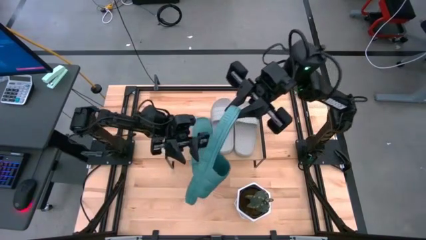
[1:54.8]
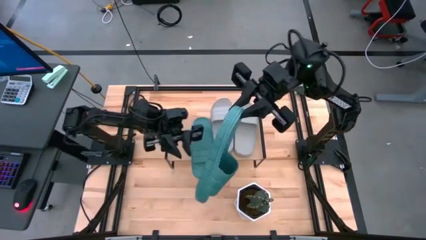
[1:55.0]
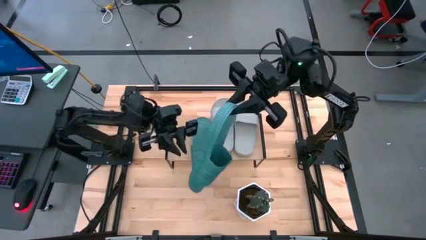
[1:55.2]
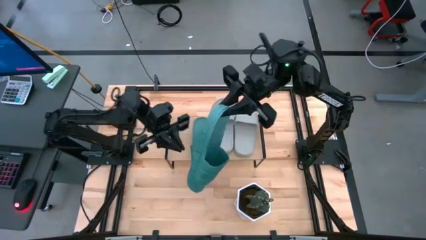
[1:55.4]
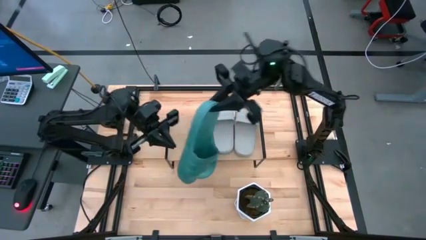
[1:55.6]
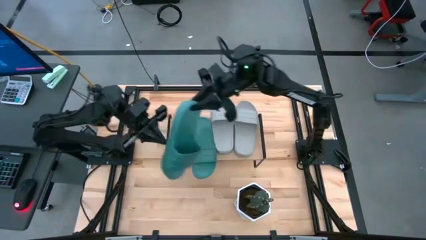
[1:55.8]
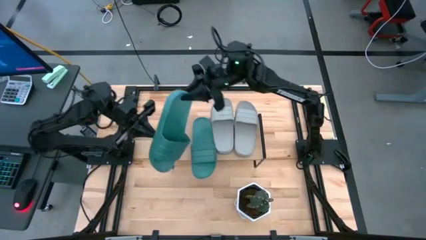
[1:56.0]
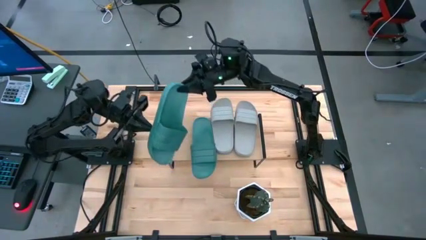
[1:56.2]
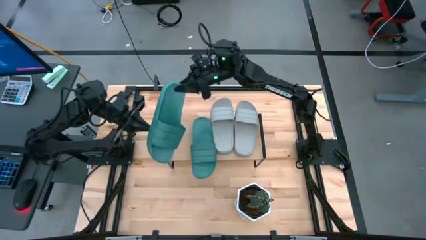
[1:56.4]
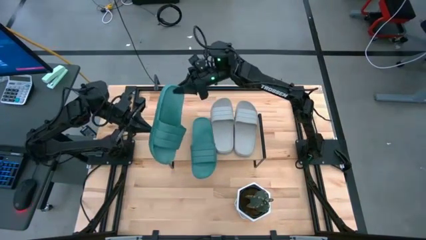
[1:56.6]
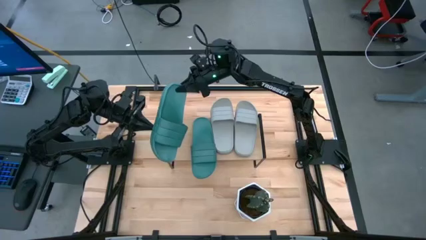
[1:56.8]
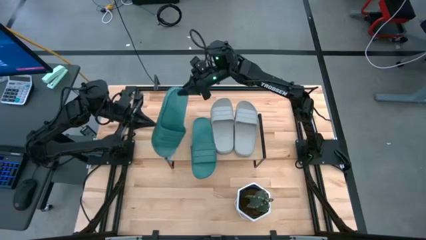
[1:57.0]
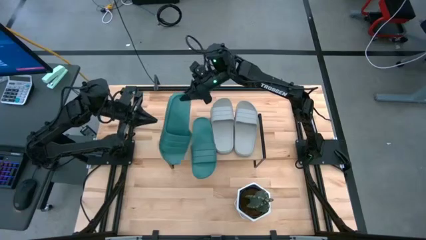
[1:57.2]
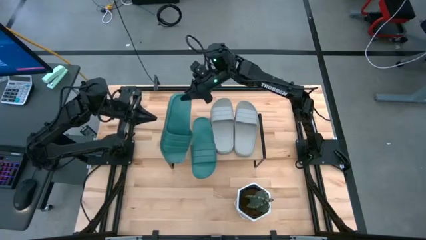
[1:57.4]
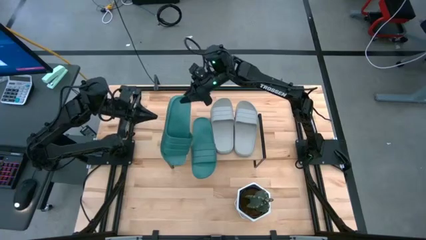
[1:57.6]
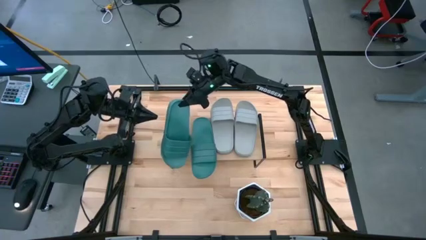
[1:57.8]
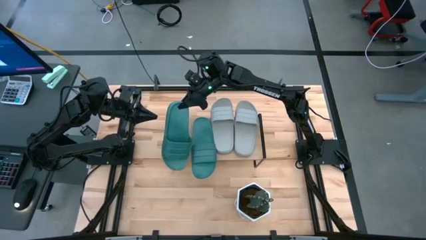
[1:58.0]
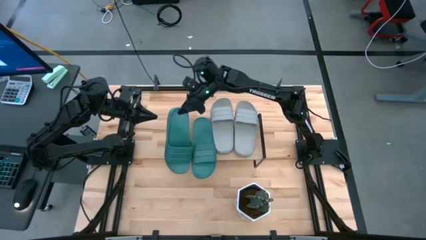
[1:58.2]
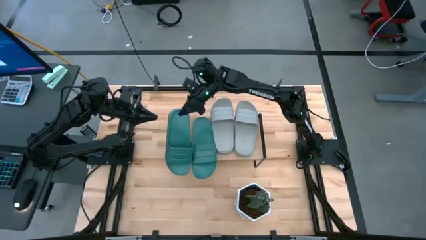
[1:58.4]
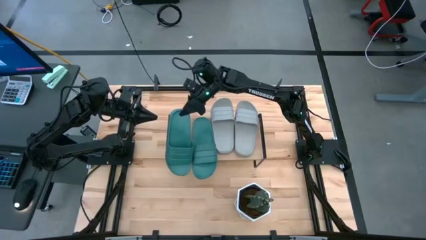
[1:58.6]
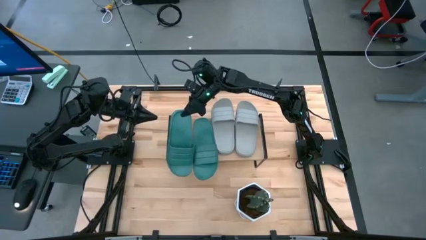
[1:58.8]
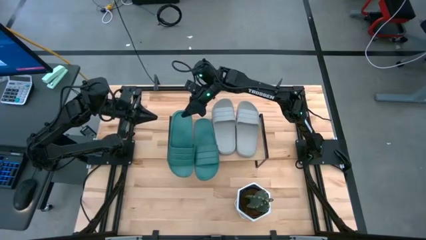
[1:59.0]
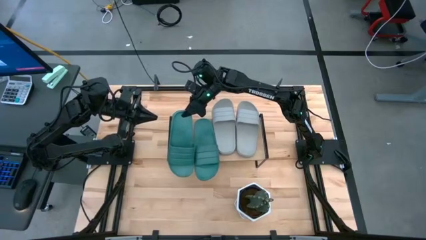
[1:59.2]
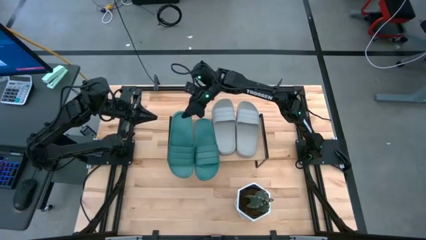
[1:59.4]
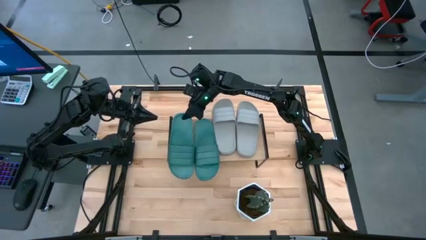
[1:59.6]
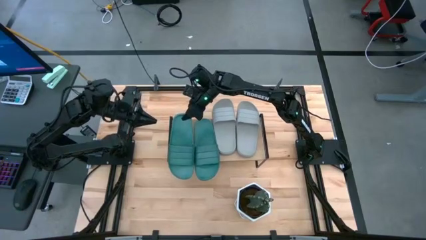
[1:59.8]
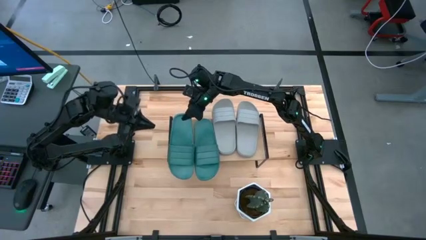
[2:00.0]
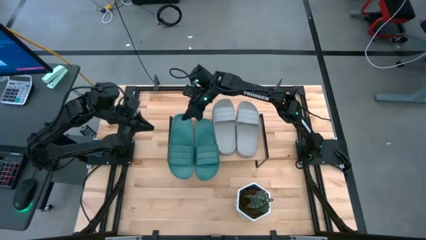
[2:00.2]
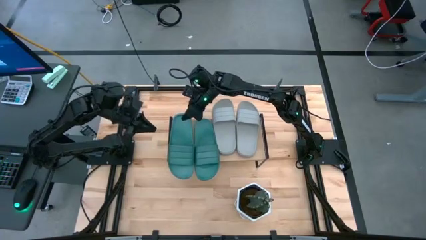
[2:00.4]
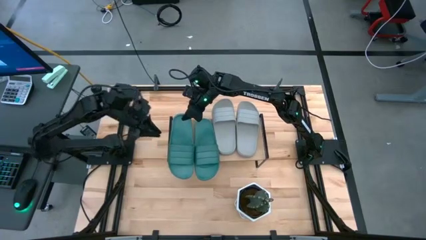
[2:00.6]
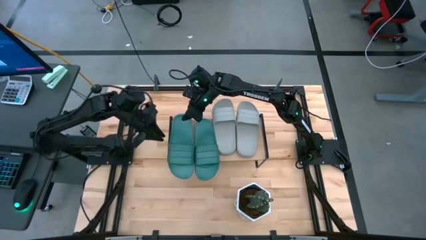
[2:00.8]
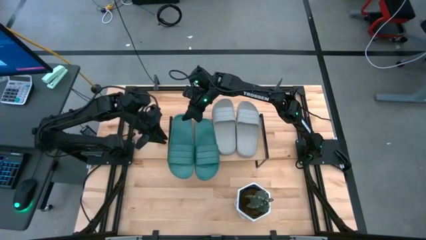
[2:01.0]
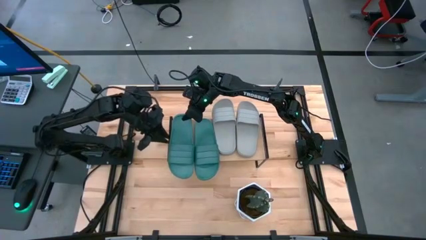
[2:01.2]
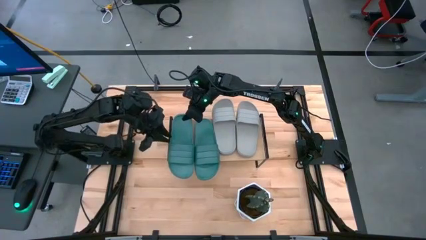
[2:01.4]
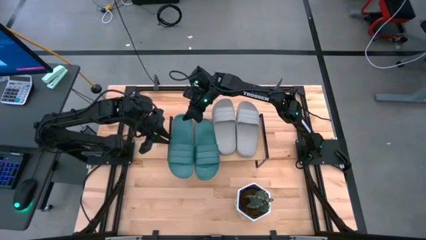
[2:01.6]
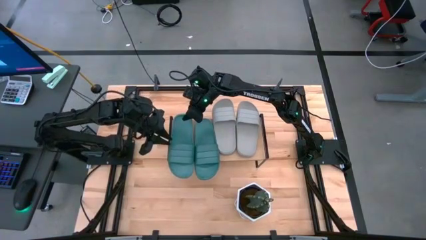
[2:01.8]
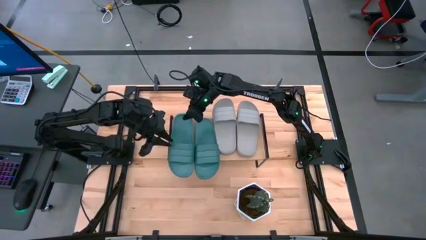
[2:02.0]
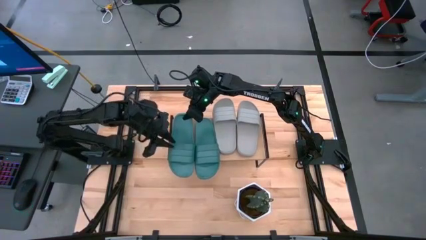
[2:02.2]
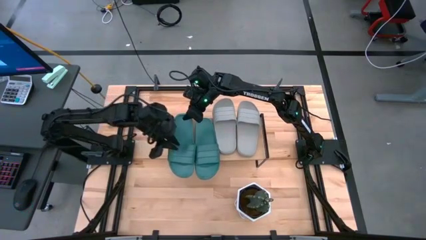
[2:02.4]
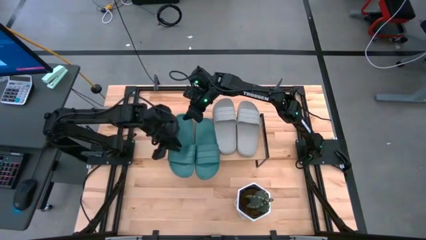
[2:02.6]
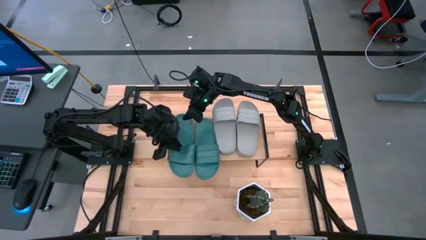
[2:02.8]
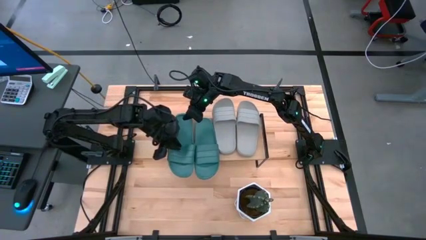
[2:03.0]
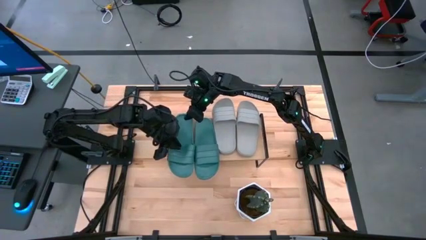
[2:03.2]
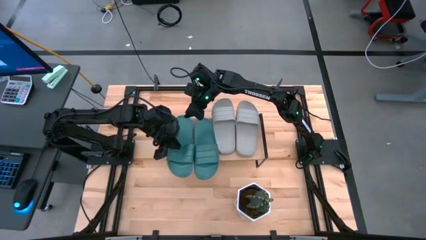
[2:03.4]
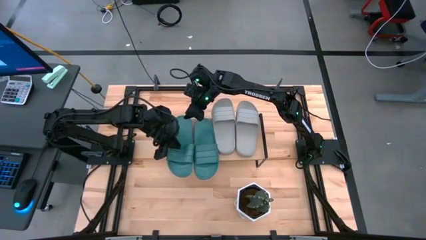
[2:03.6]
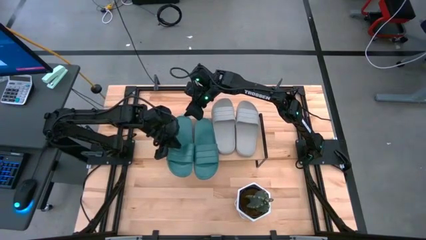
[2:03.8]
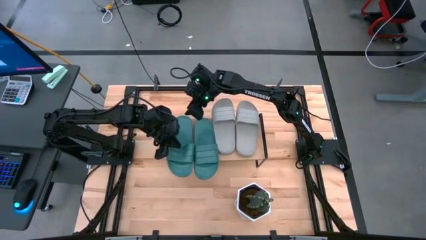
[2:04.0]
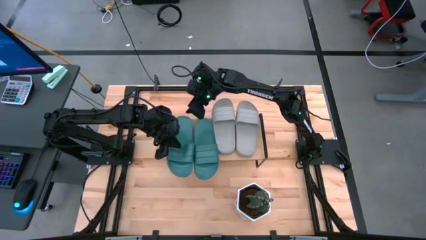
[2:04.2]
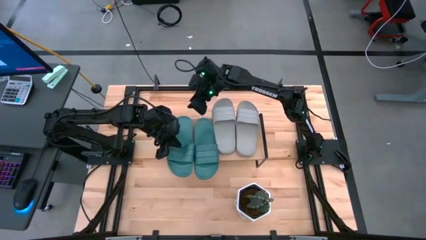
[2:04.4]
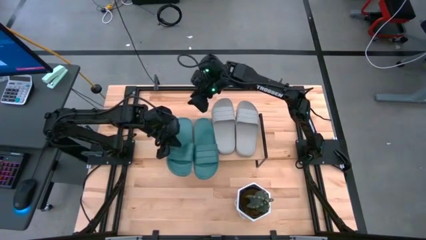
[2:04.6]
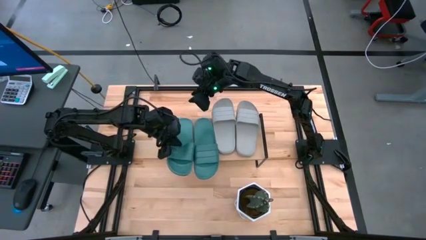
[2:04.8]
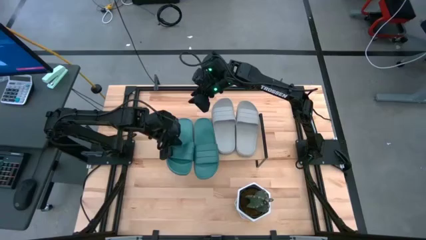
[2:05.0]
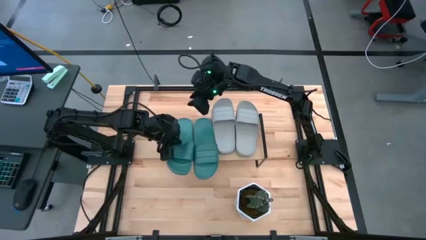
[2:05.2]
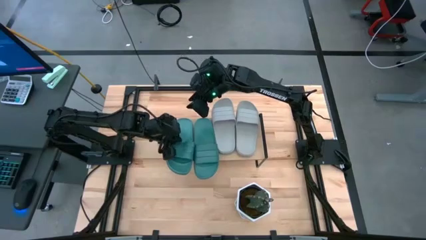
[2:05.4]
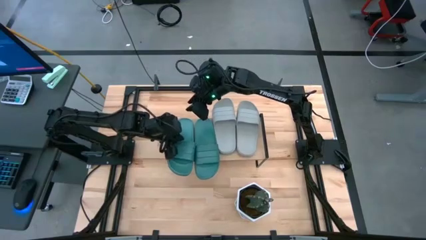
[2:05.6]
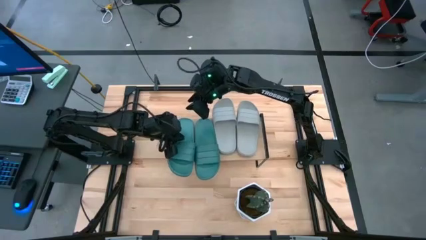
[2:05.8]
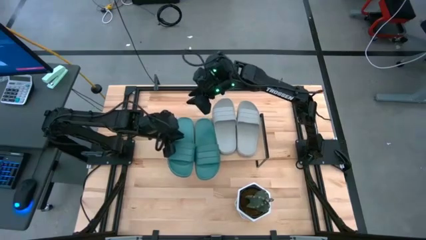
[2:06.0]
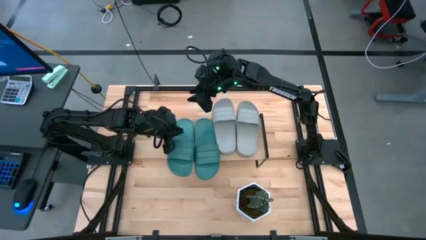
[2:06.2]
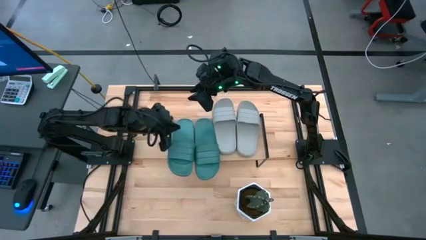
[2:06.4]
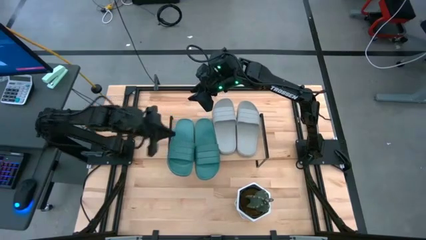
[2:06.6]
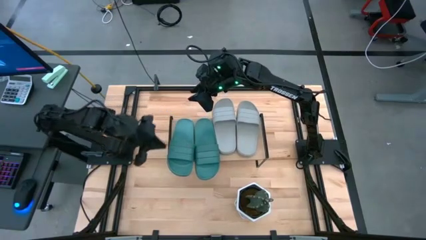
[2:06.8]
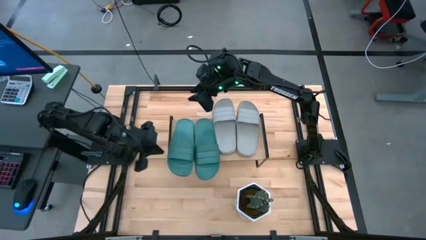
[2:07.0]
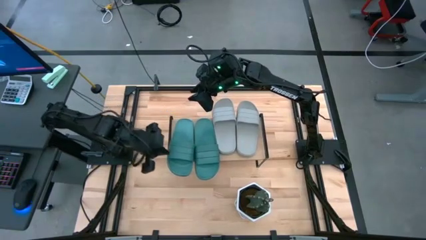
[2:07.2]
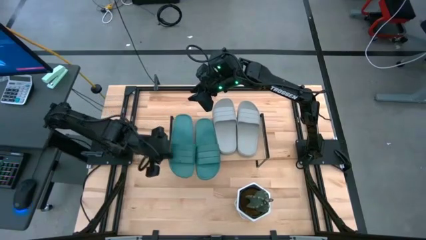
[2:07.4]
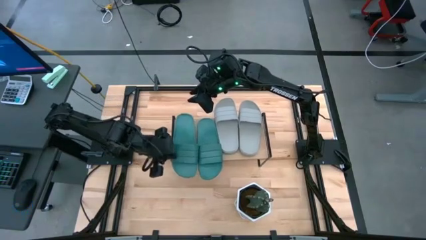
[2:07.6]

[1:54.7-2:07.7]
Task: Pick and place slides into the shelf
Put the green slide on the shelf
